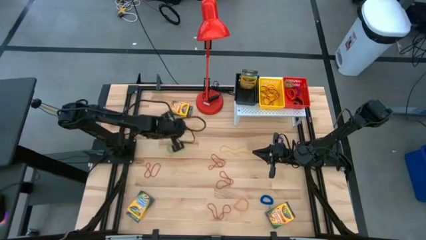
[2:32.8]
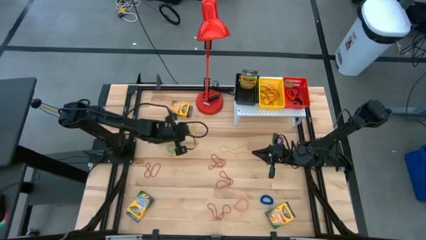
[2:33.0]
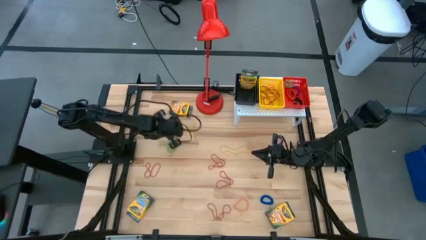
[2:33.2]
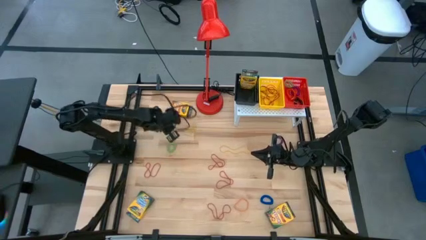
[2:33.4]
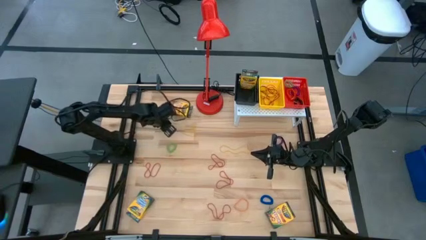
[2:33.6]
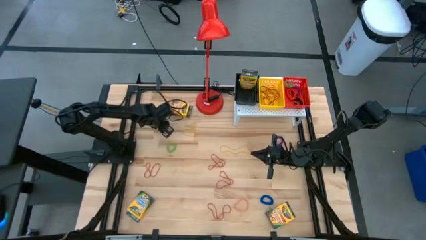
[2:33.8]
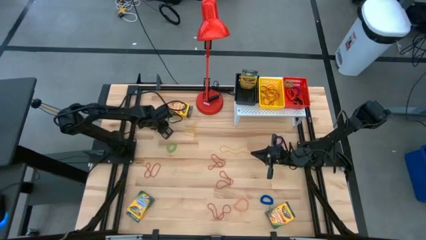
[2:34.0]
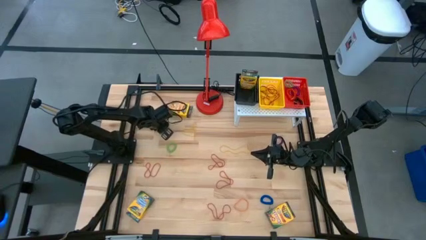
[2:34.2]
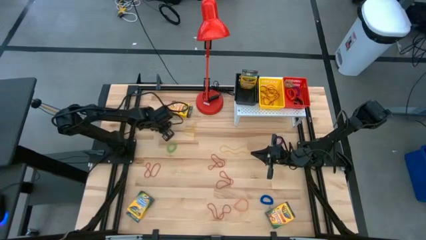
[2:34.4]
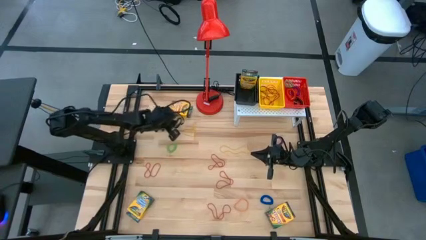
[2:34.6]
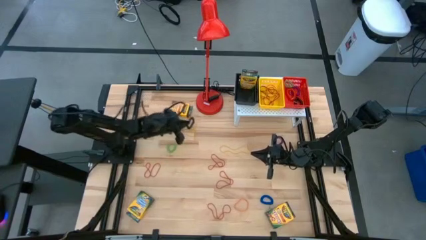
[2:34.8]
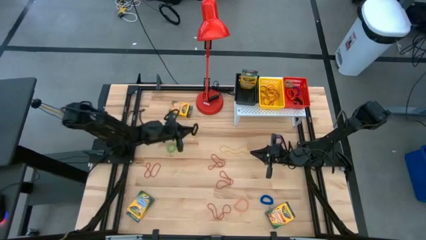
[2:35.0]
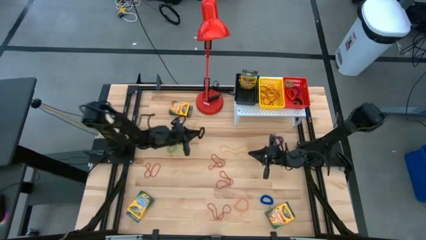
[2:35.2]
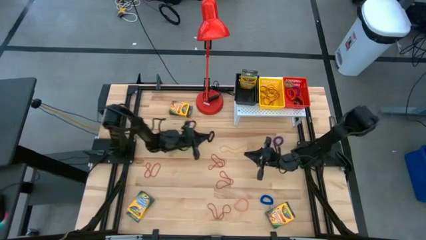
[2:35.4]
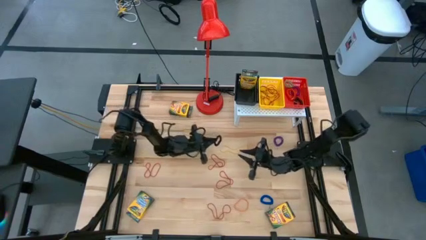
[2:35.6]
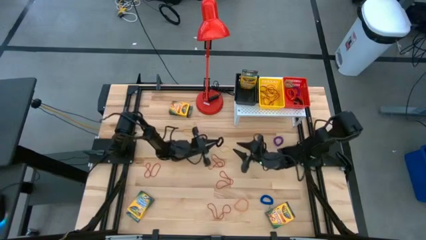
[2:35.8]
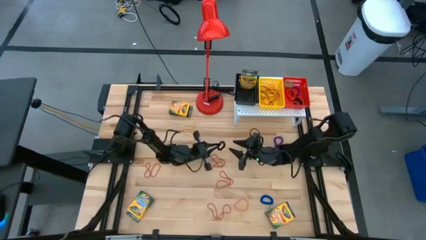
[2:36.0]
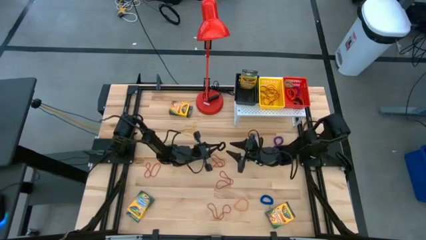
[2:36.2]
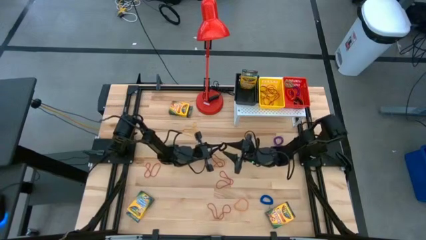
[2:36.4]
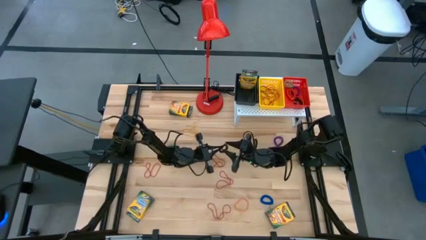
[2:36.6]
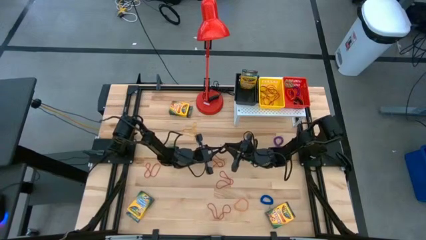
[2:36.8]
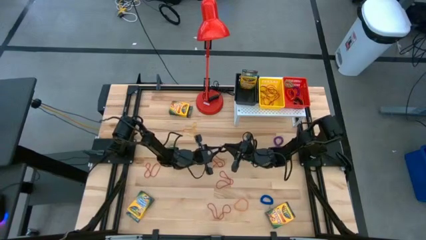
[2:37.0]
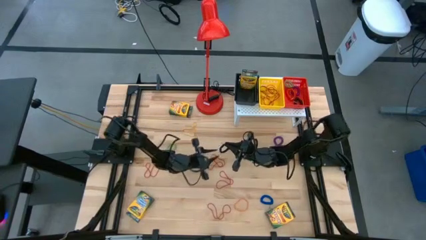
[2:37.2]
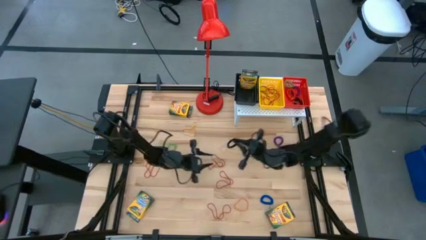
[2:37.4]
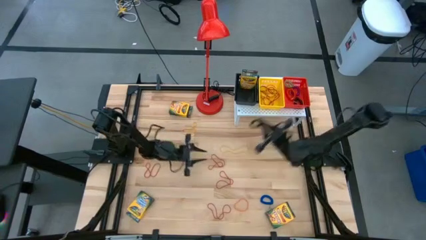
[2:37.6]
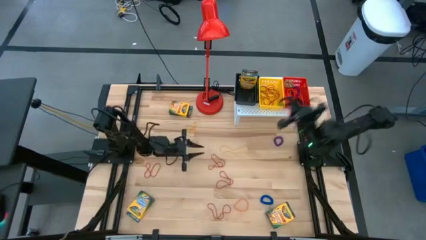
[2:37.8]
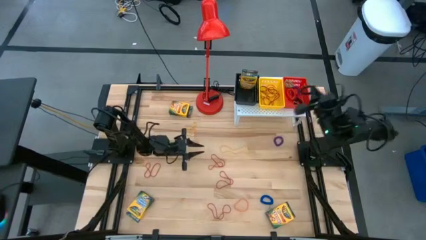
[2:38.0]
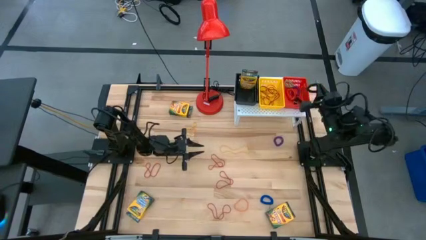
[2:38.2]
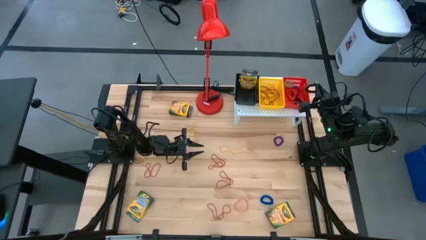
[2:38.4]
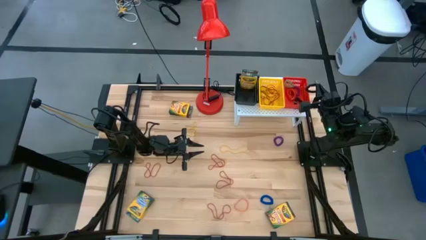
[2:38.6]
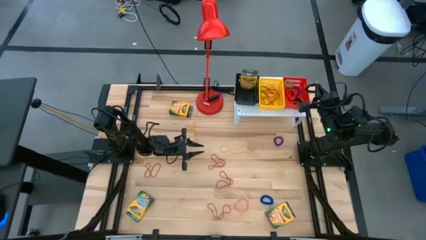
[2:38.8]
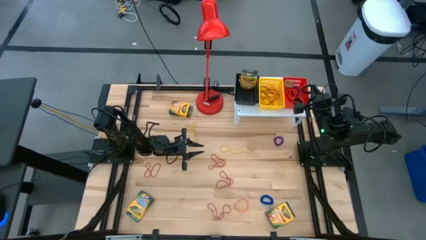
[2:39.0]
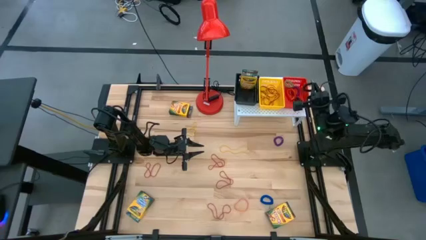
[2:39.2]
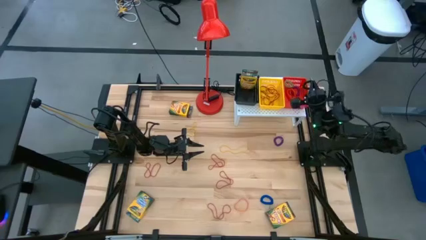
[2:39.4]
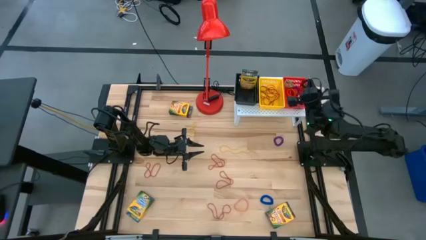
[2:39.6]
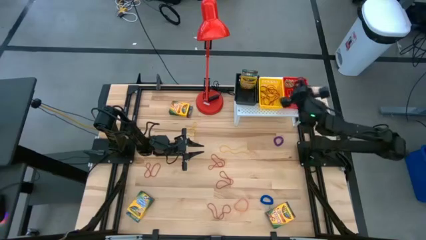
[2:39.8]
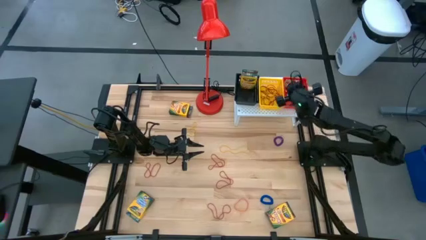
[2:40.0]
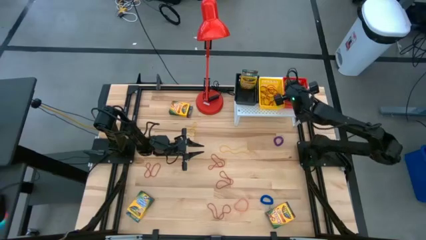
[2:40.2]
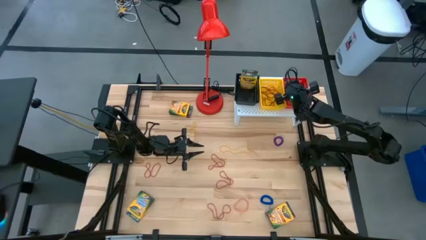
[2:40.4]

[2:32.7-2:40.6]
Task: Pick & Place Office Desk Supplies
Put the black spring keychain into the red bin

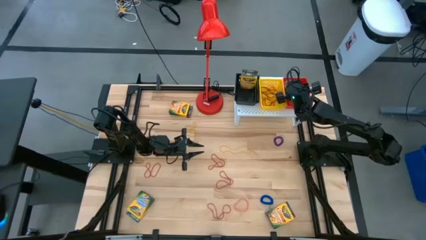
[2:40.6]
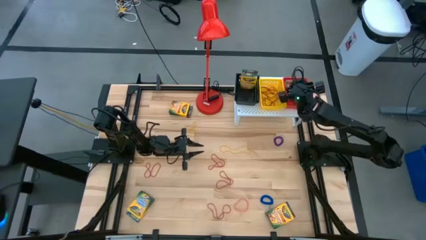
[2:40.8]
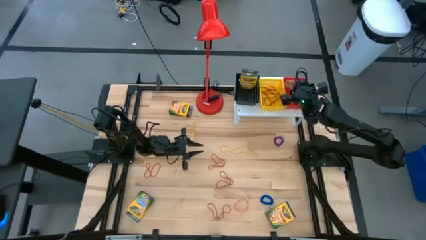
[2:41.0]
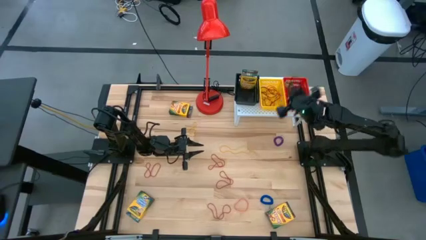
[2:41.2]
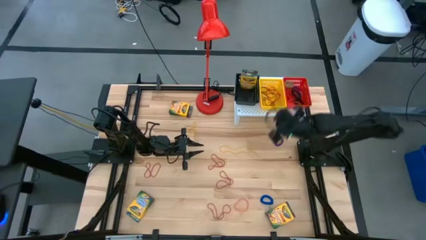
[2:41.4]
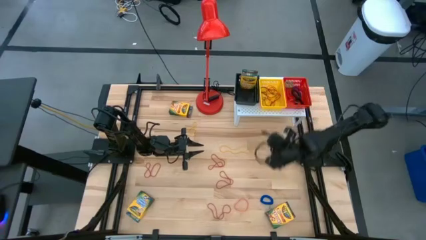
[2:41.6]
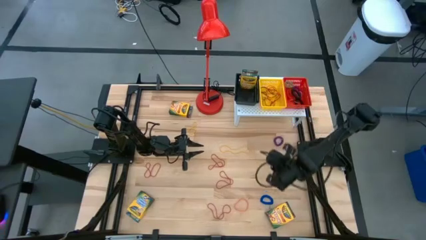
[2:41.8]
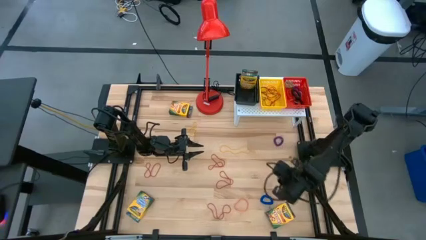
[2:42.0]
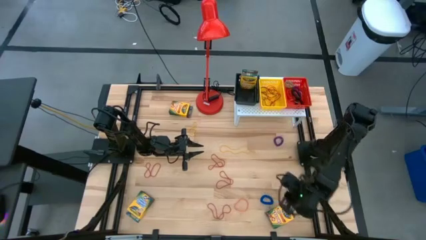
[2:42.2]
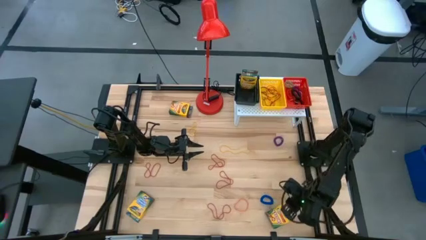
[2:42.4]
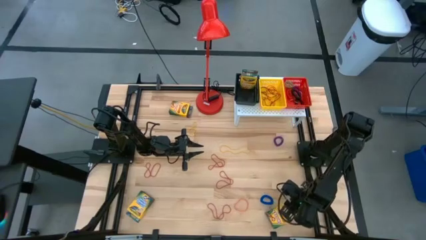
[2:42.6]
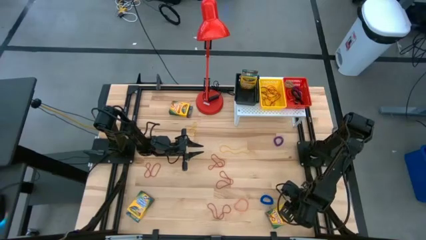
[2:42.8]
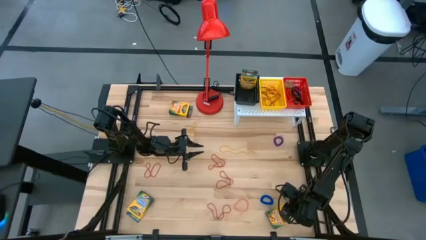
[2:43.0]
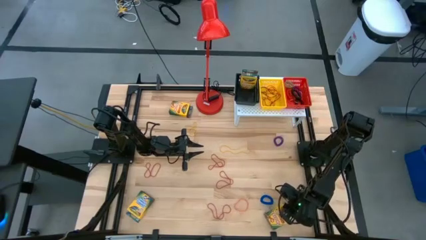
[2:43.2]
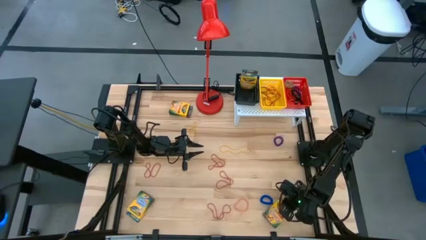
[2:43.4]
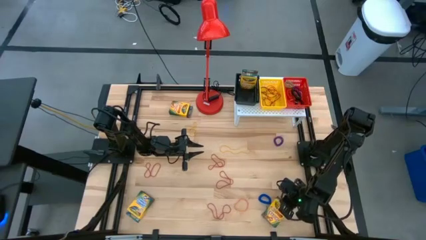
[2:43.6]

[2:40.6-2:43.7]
Put the bottom right crayon box into the black bin

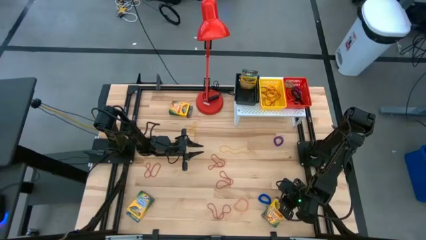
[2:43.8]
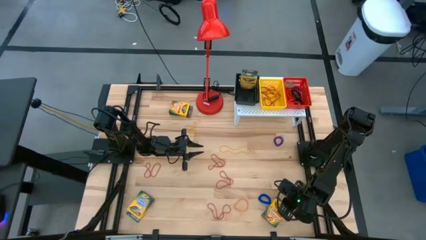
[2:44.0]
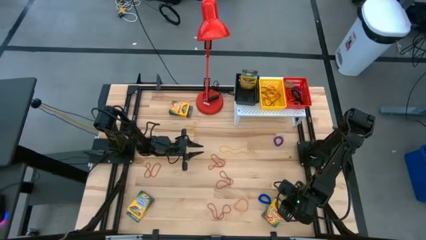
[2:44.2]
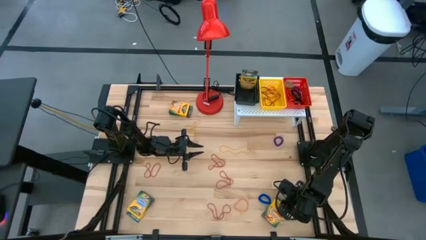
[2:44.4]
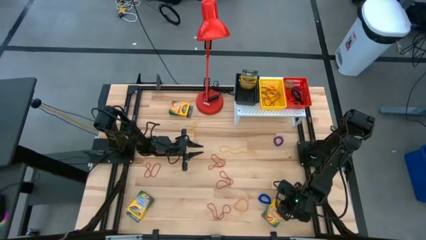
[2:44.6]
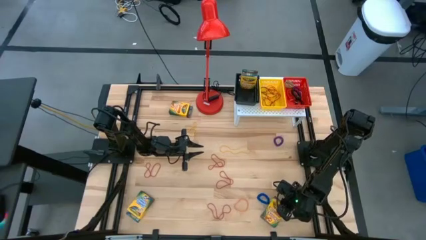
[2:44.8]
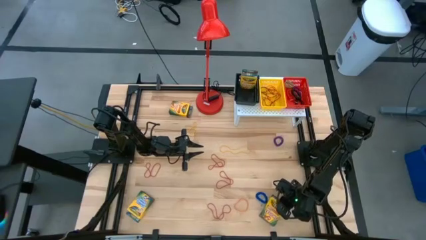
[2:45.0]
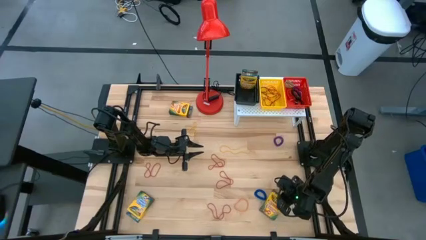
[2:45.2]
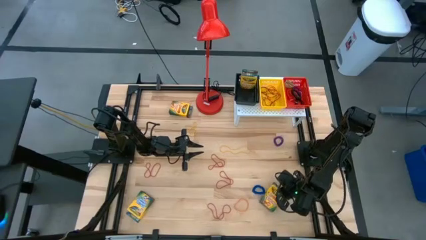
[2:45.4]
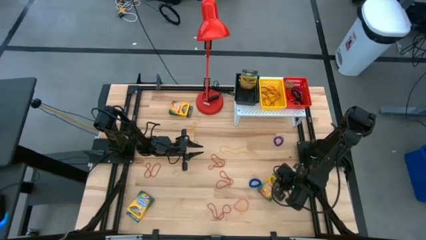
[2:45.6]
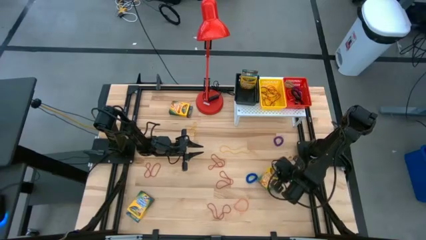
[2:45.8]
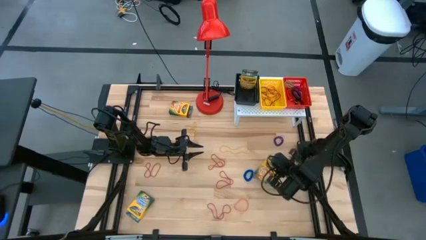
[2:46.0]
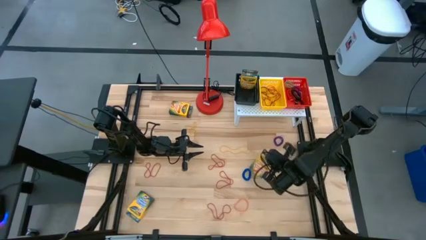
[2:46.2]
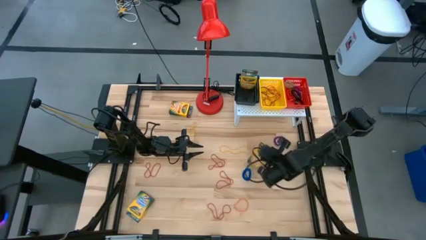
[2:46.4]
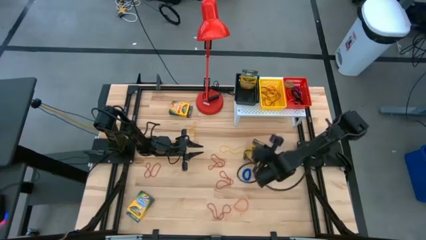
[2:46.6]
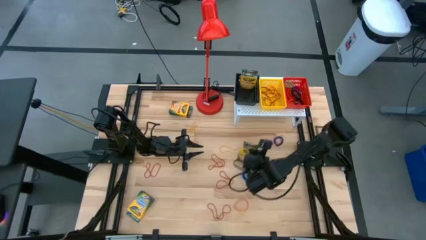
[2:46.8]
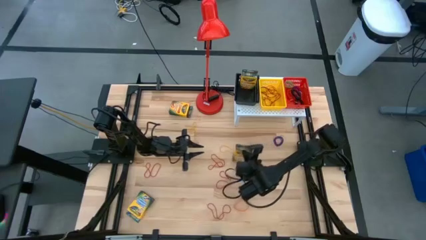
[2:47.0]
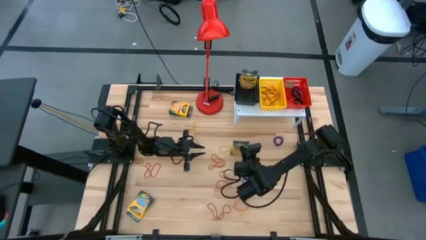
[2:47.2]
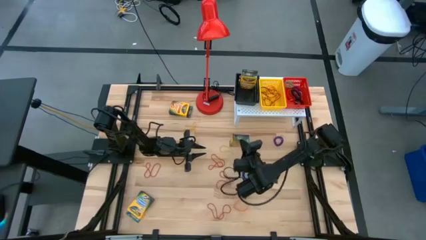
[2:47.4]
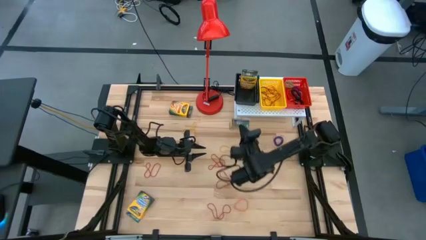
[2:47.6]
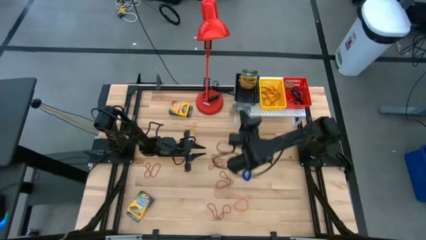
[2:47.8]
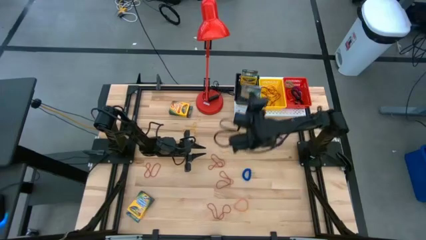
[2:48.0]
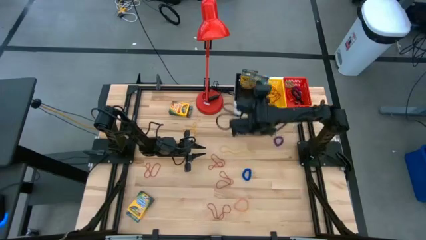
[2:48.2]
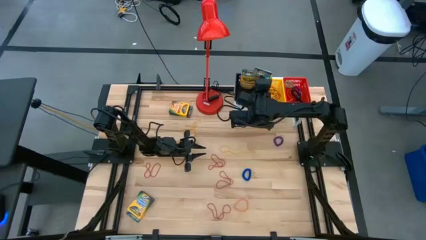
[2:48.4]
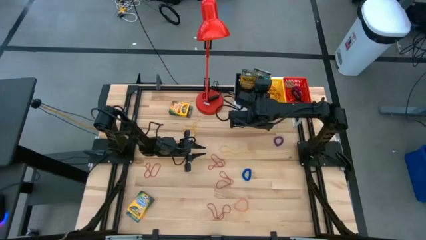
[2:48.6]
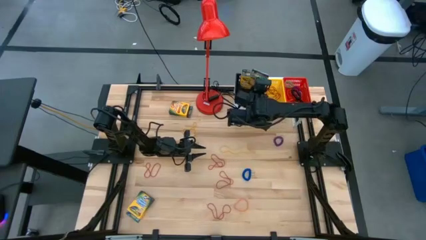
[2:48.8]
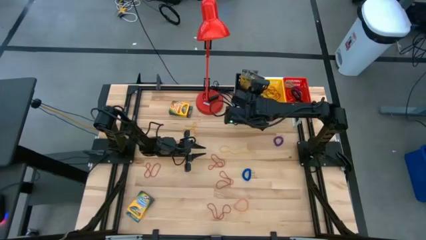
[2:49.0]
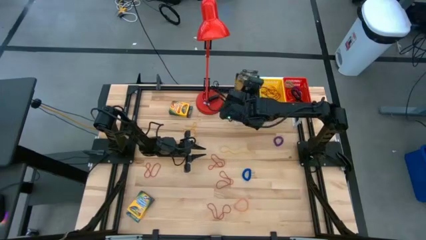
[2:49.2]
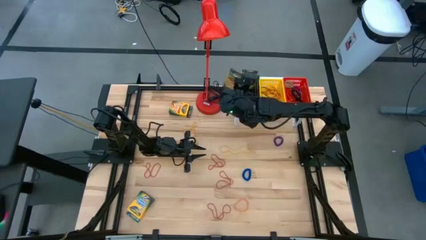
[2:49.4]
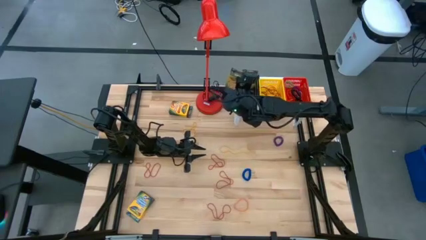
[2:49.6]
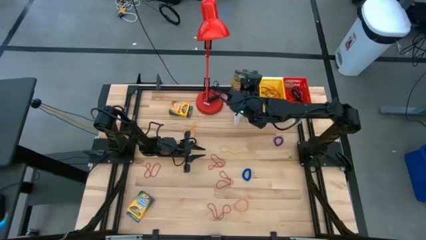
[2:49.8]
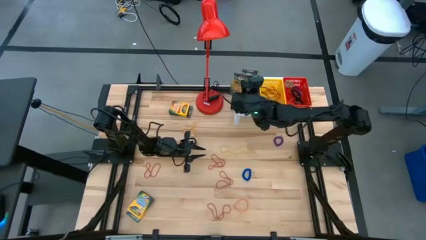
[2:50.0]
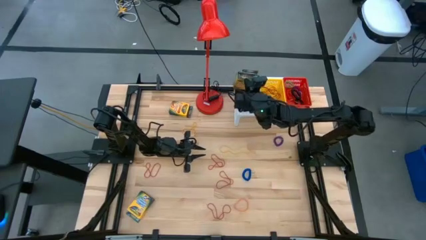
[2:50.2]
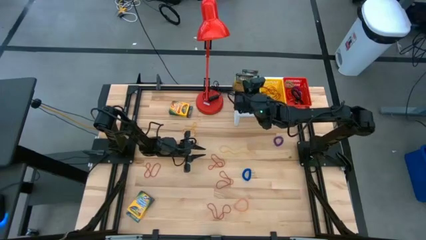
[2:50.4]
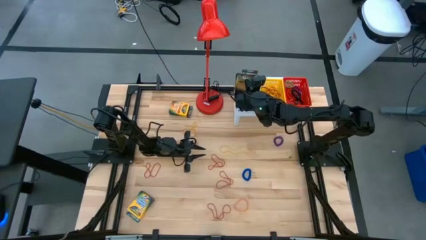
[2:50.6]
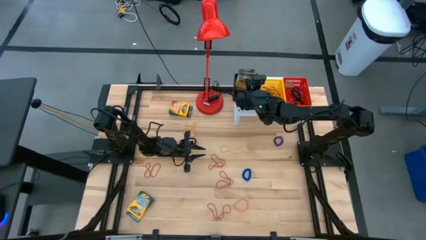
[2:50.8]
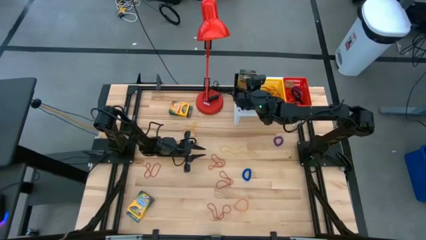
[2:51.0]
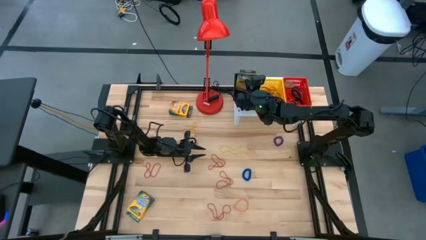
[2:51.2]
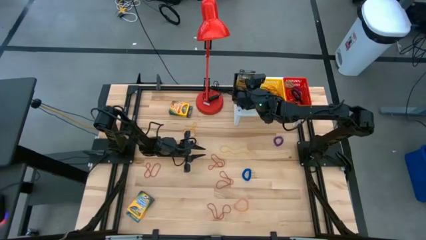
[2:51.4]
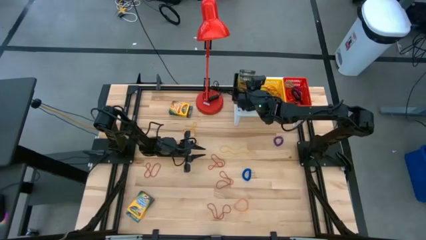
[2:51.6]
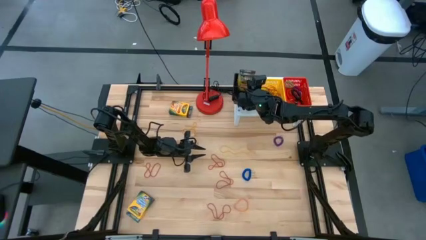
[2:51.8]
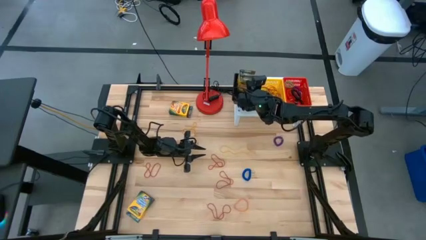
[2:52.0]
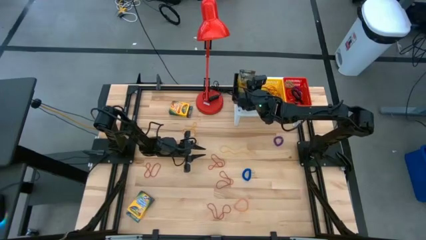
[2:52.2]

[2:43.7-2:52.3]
Put the bottom right crayon box into the black bin
